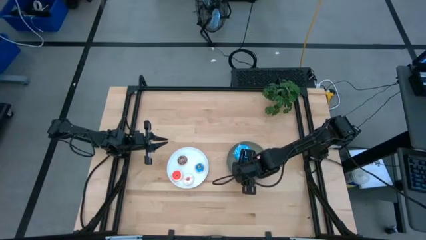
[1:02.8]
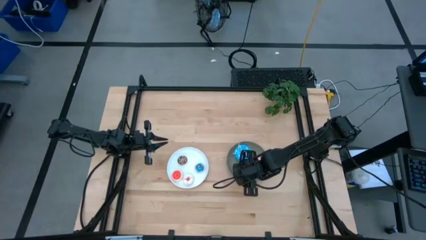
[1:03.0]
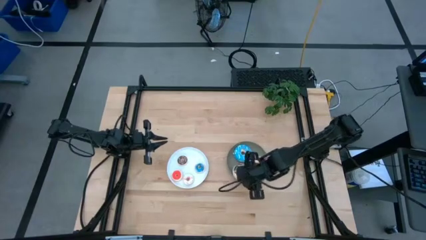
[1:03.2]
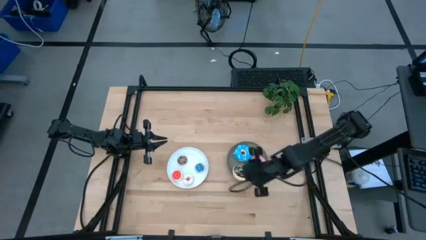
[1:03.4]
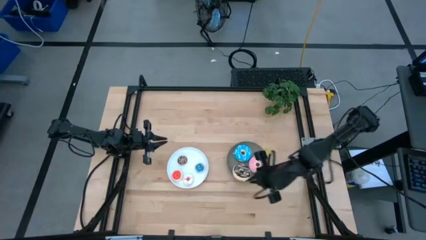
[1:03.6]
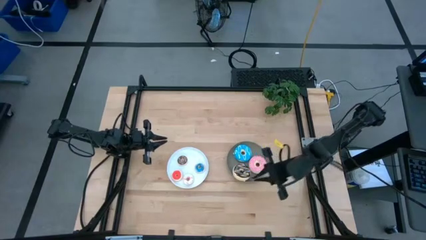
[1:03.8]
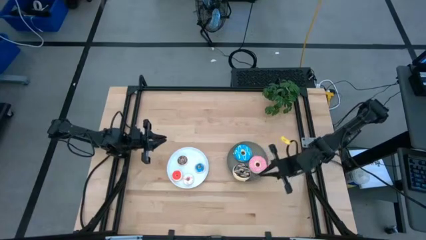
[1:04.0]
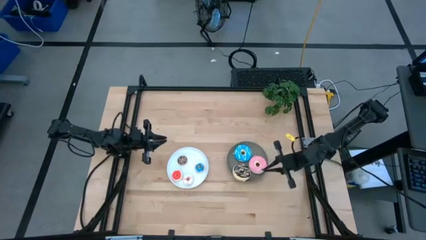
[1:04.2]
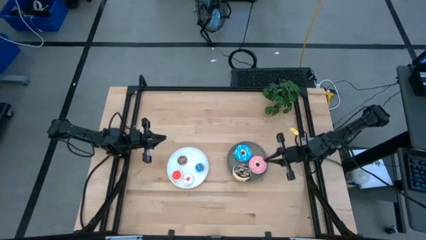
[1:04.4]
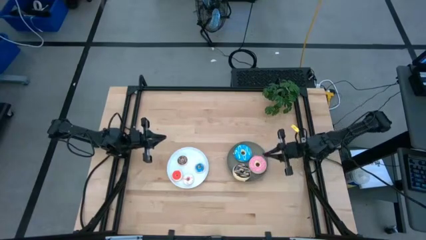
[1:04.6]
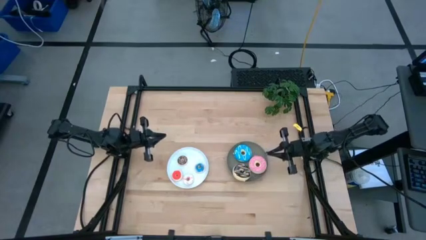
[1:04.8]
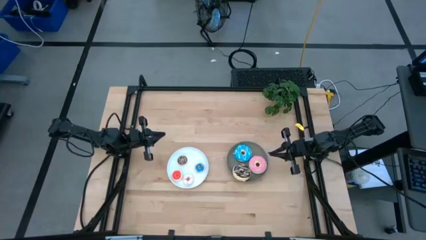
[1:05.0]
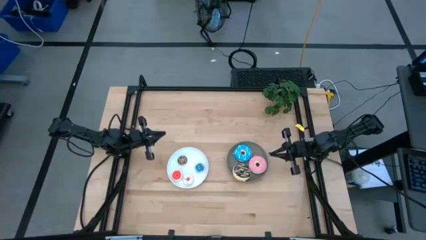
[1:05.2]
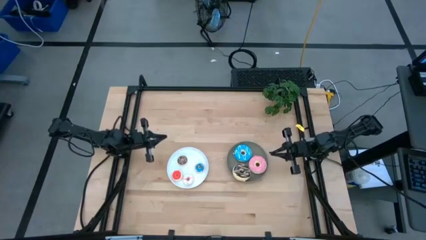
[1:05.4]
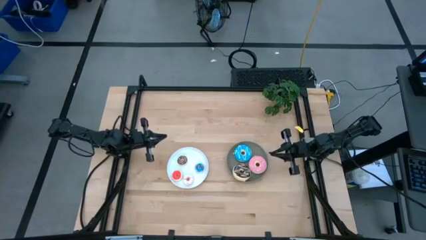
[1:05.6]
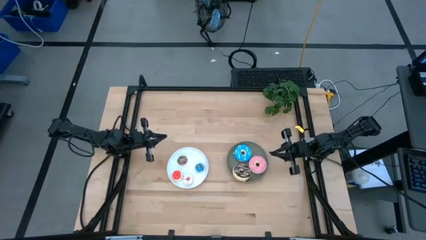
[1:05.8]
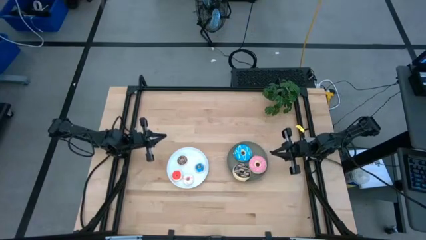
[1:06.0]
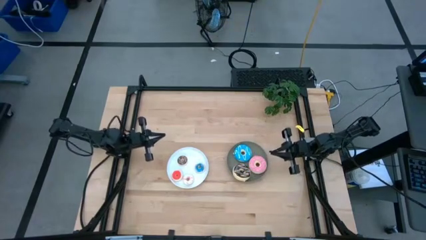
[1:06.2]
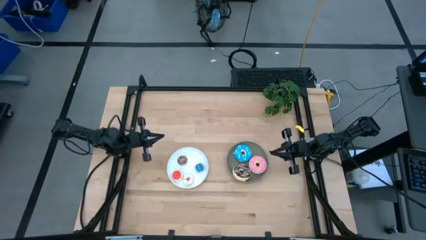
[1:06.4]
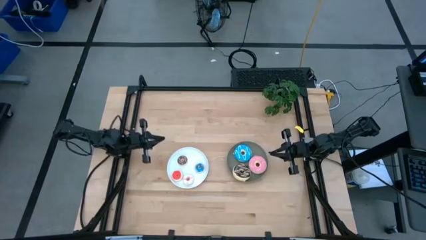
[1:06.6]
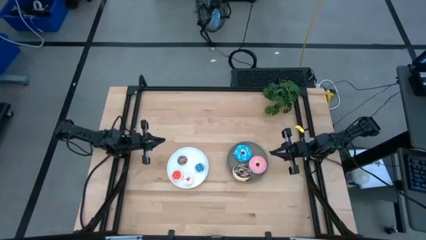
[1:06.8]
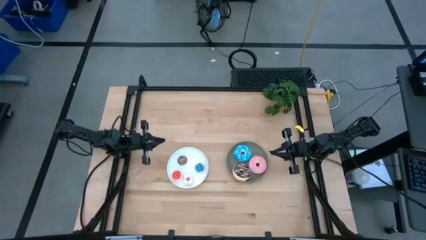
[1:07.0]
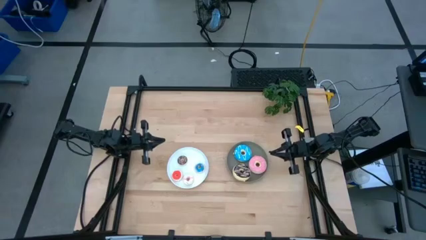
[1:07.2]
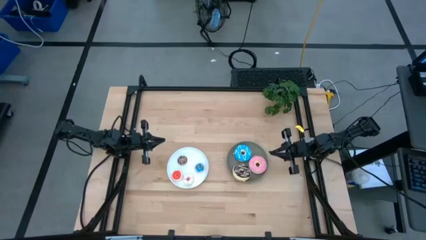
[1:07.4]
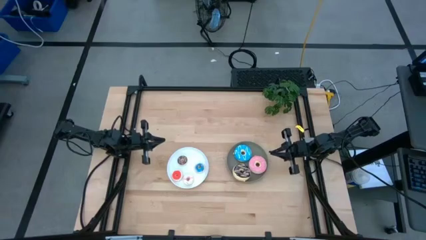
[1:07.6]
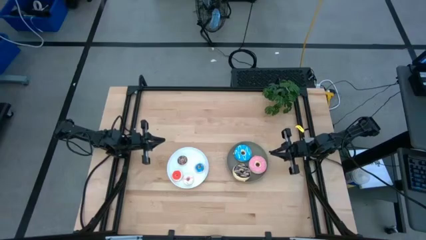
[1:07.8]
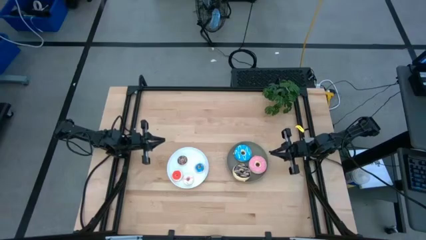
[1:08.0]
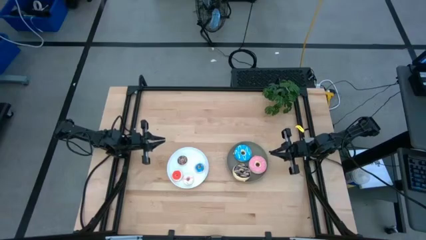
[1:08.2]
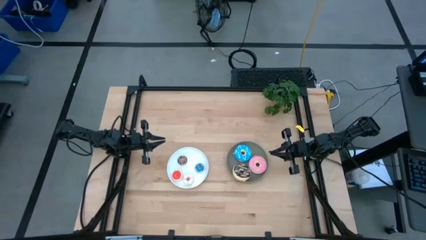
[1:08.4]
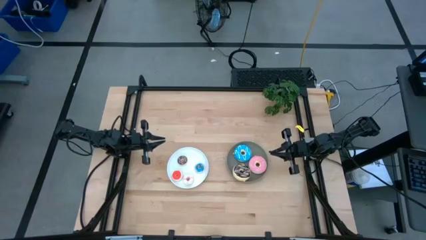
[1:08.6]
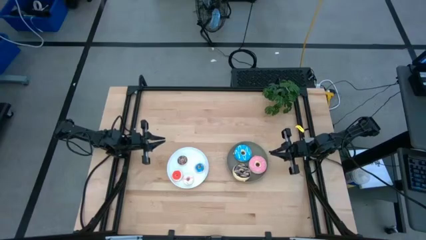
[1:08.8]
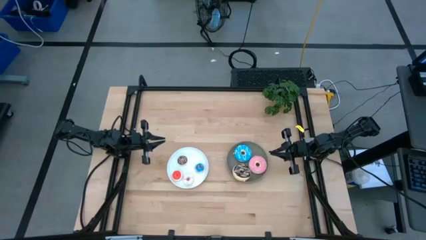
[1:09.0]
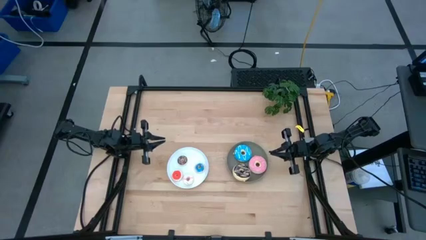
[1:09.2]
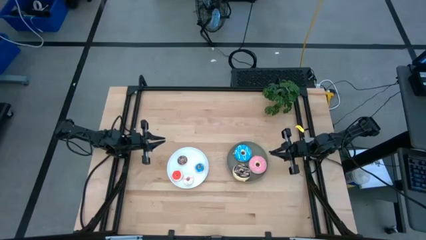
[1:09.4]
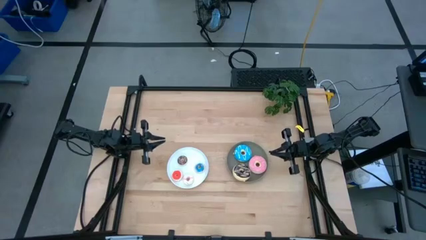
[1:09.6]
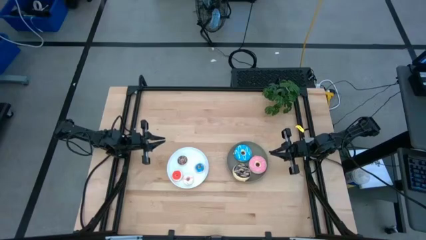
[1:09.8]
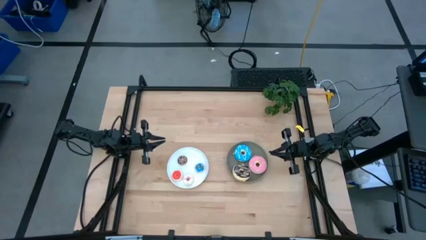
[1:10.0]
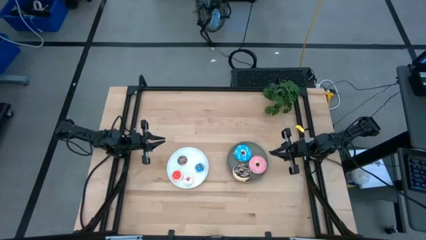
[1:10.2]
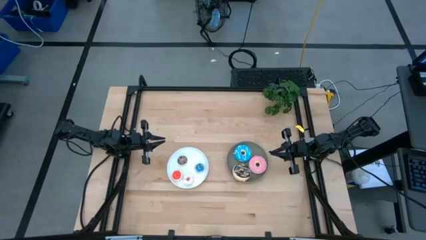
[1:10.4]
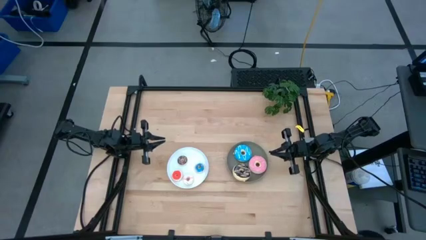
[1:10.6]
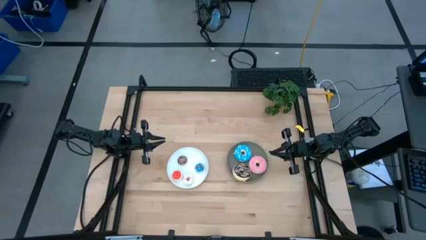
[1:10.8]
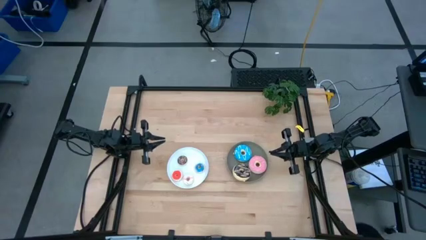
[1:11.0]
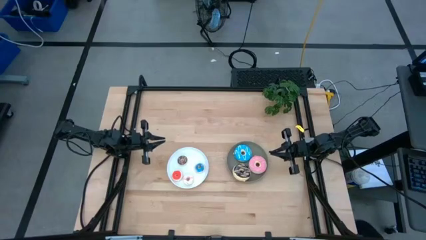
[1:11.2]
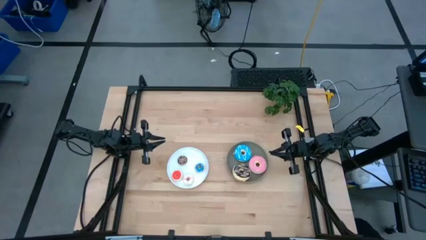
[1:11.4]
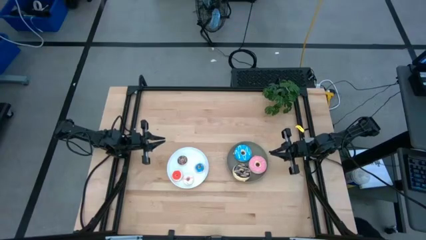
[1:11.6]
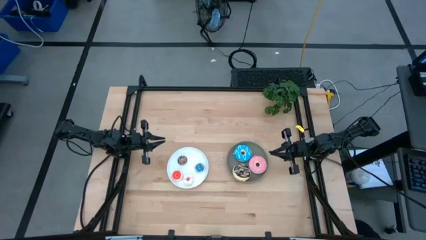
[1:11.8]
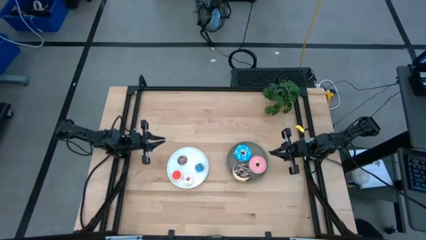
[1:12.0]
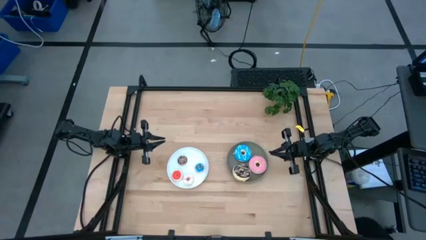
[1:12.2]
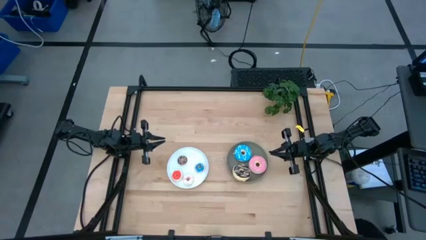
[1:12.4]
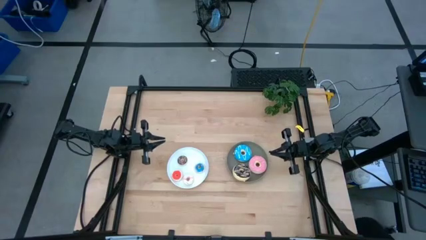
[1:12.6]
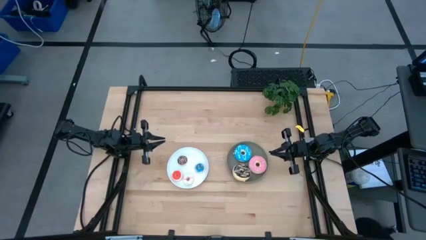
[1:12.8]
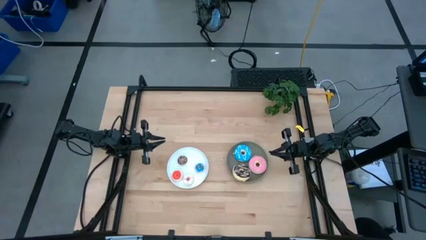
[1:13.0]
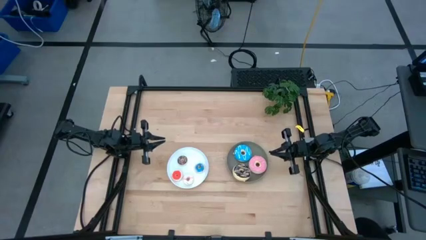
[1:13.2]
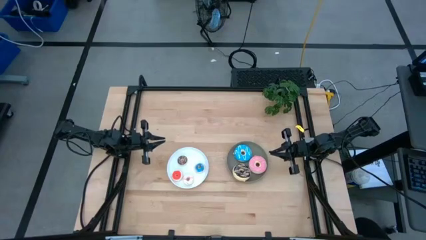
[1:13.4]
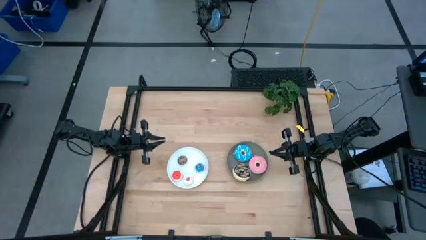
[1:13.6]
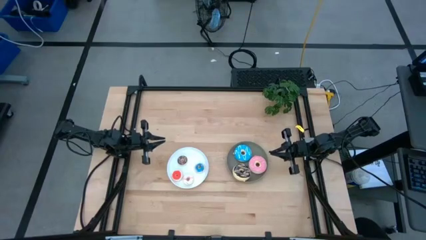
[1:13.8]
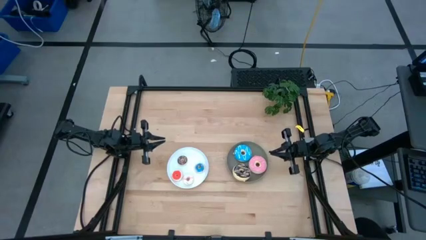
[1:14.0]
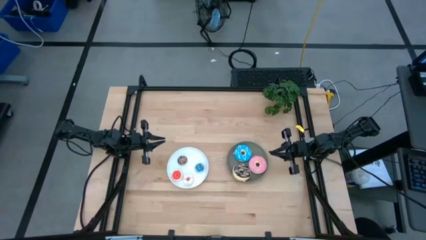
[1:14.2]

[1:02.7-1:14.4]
Task: Pick & Place donuts
Return to Home Position

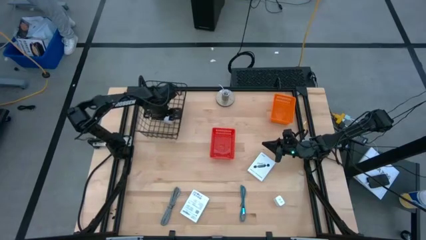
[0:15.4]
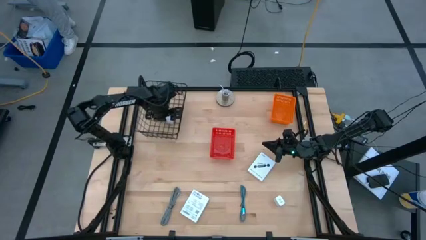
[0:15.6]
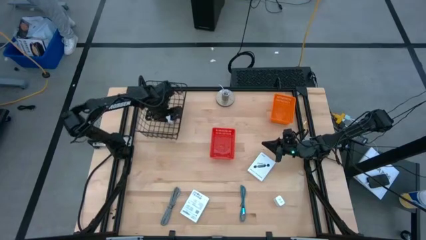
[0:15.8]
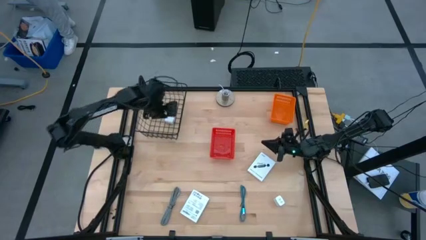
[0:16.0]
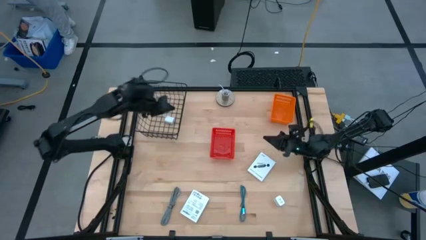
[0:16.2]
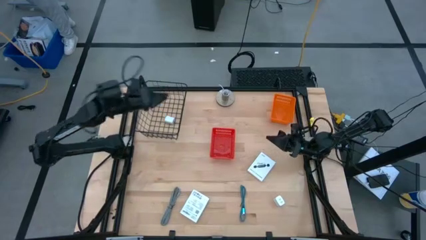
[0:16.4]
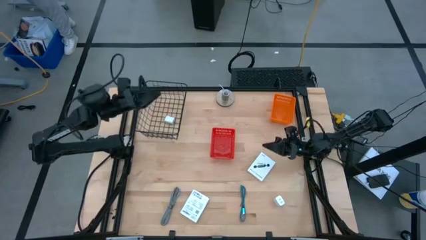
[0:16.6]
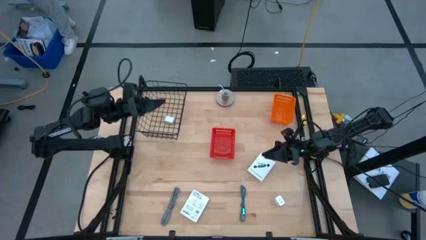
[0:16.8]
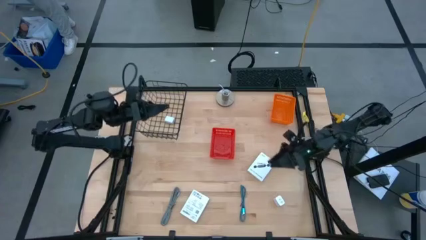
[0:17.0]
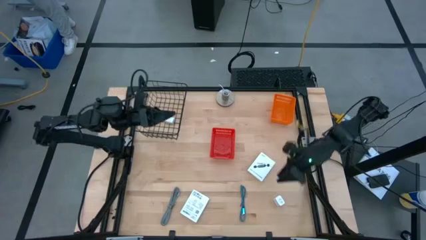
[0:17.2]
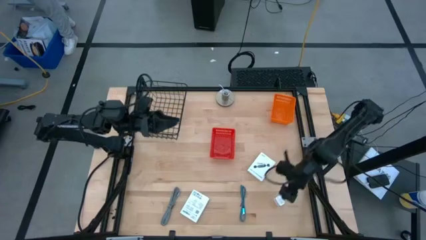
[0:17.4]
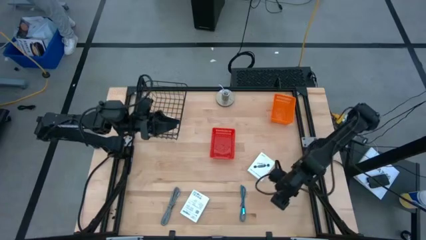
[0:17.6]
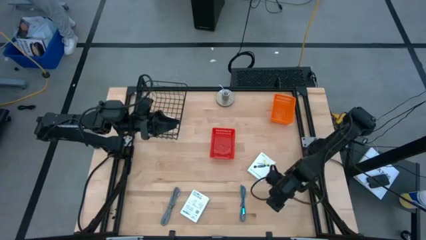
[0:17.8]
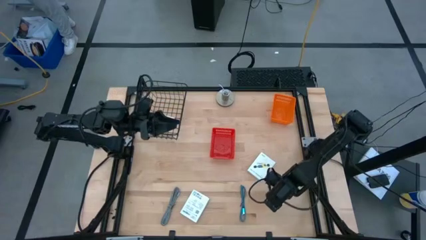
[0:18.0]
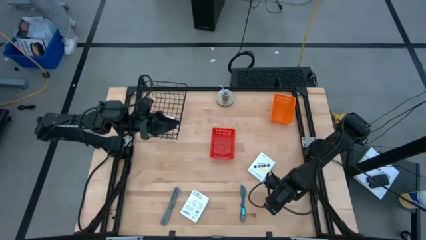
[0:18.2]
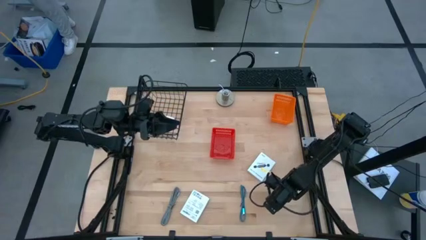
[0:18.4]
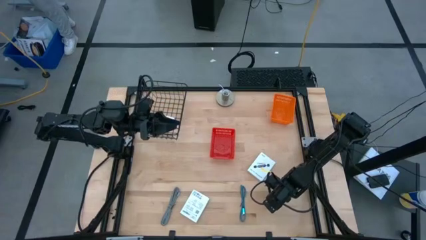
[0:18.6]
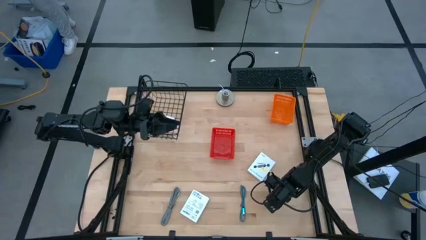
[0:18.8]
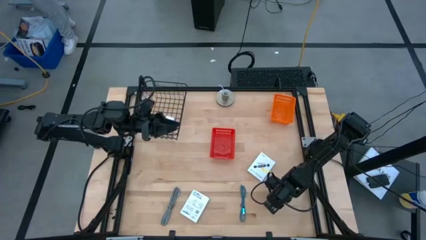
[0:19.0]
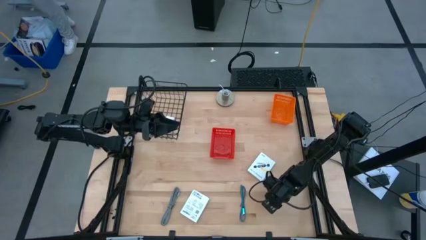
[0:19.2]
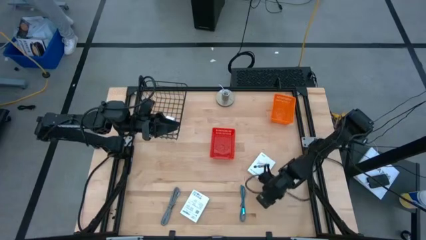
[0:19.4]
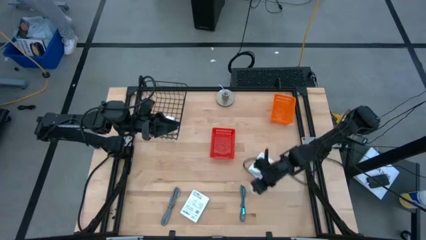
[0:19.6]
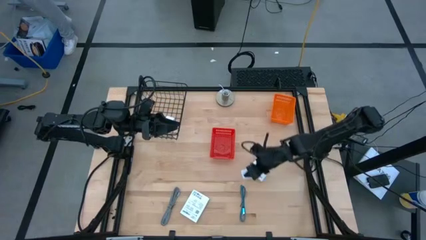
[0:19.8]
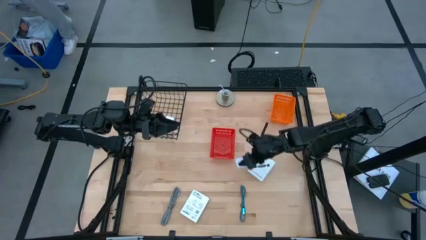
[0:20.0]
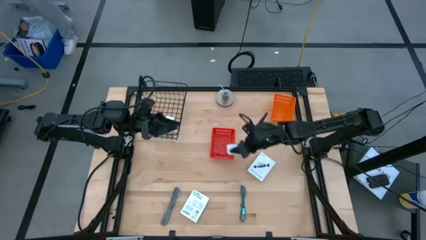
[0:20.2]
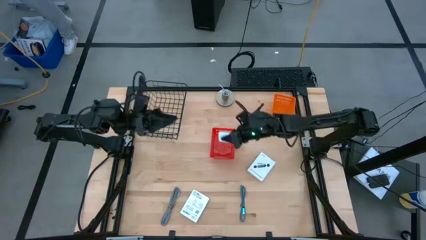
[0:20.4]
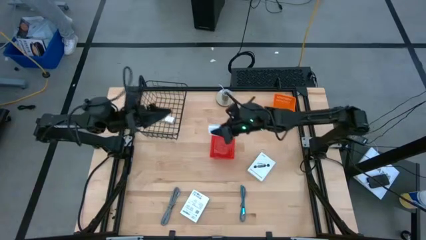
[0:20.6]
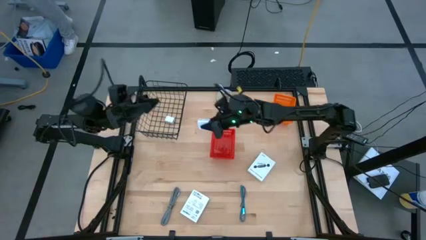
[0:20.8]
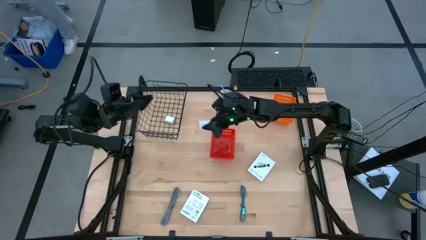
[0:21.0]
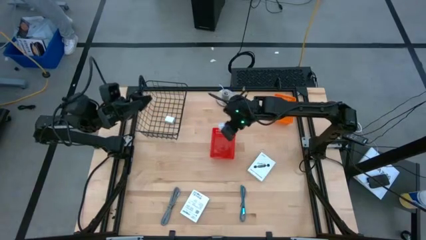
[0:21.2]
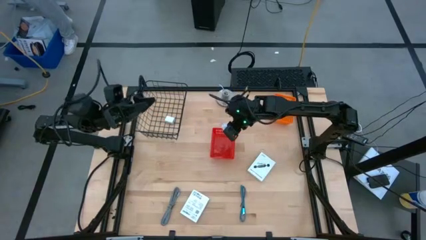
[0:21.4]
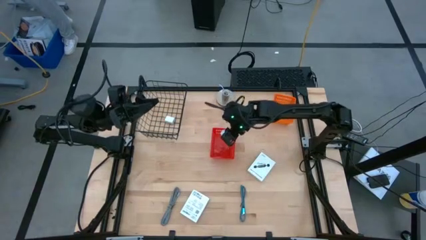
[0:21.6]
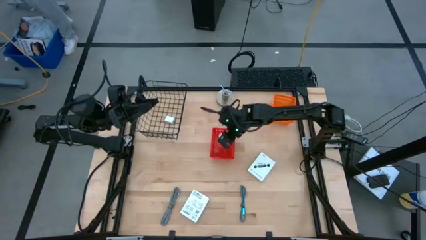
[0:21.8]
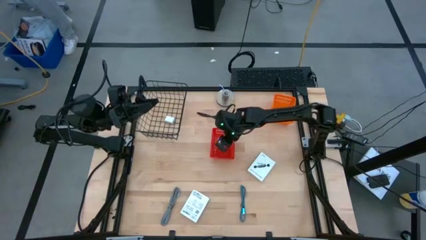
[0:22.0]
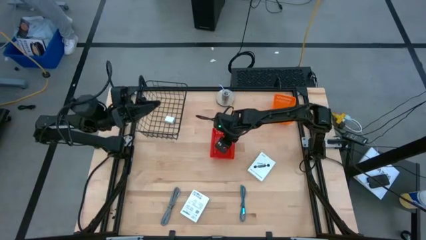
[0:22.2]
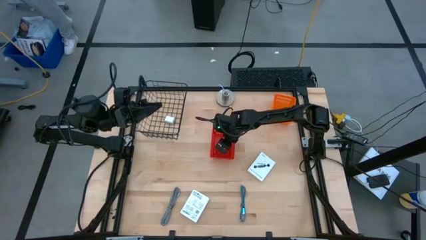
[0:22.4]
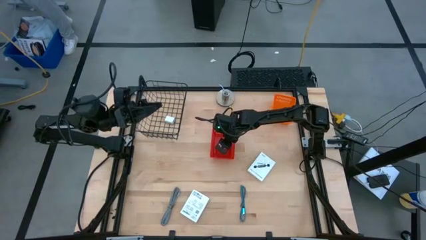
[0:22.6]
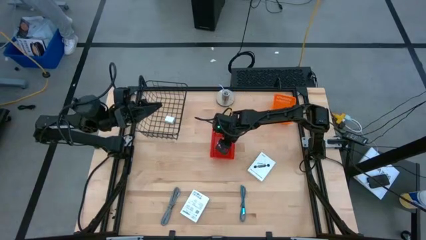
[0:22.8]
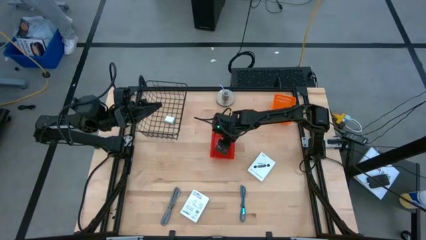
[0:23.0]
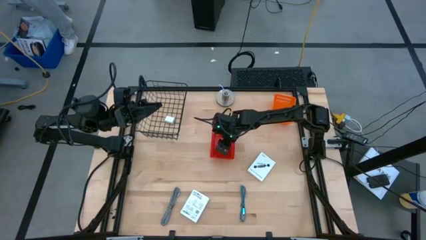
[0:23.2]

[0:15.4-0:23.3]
Task: Pick and place items into bin
Put the white charger adapter into the red bin
